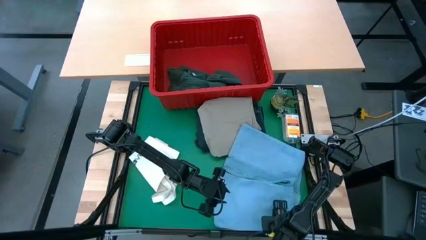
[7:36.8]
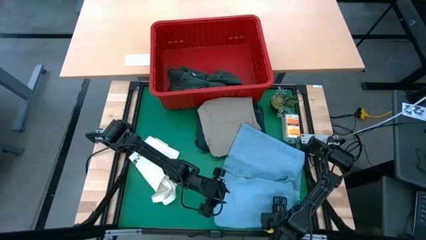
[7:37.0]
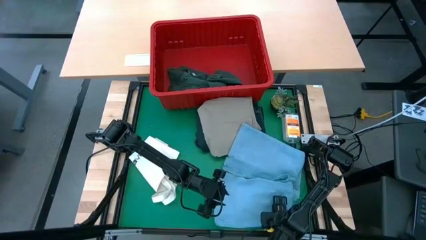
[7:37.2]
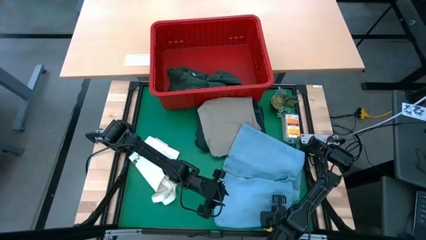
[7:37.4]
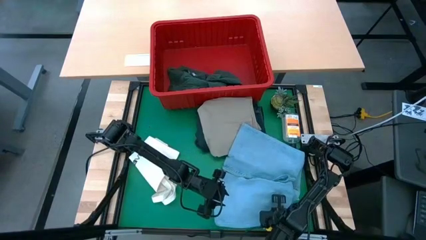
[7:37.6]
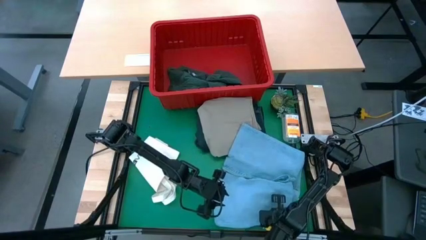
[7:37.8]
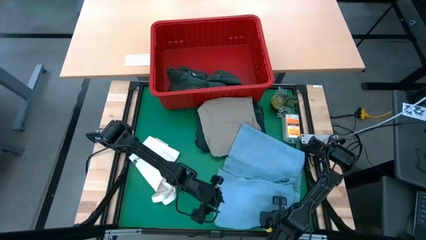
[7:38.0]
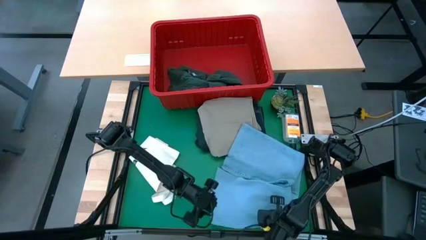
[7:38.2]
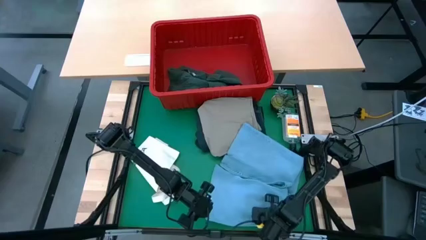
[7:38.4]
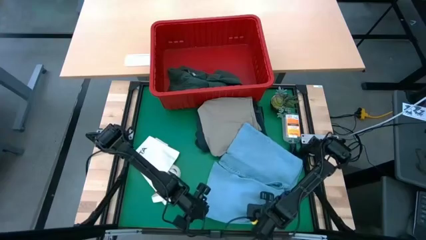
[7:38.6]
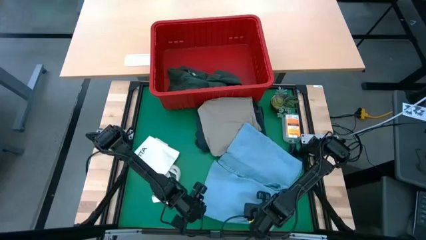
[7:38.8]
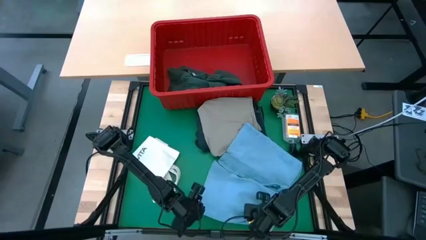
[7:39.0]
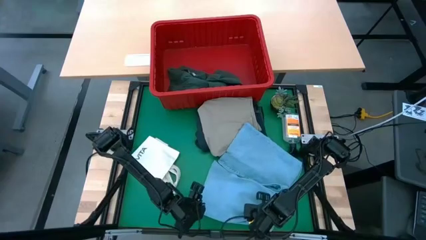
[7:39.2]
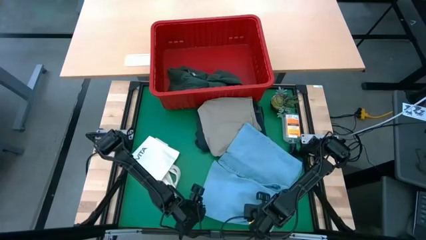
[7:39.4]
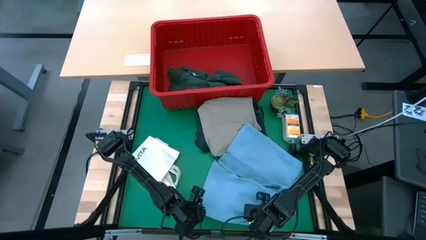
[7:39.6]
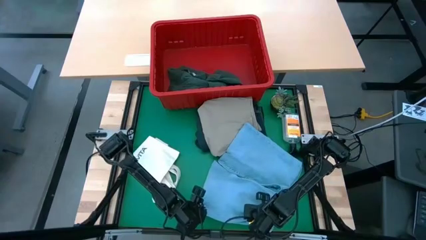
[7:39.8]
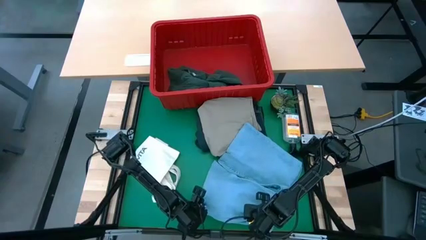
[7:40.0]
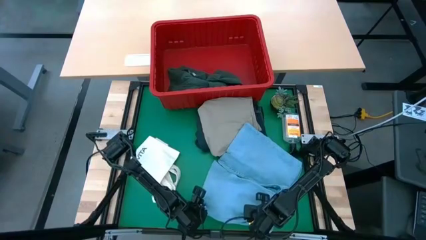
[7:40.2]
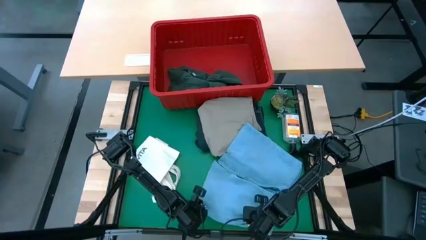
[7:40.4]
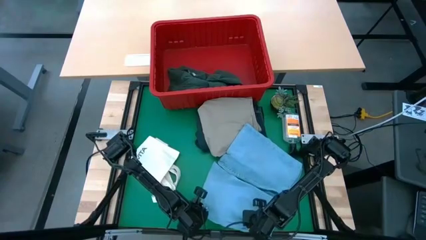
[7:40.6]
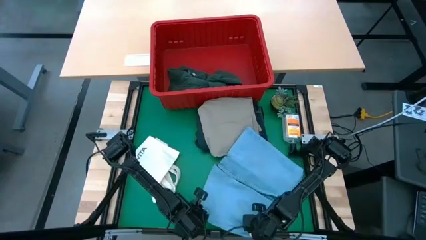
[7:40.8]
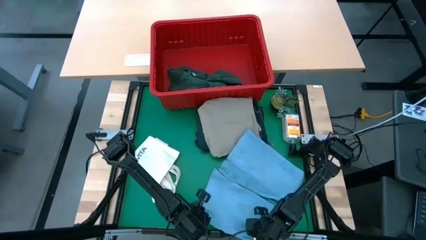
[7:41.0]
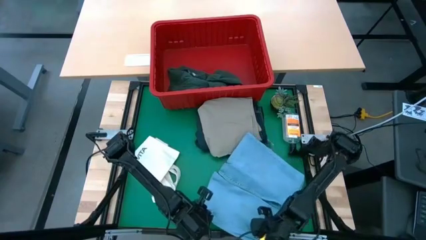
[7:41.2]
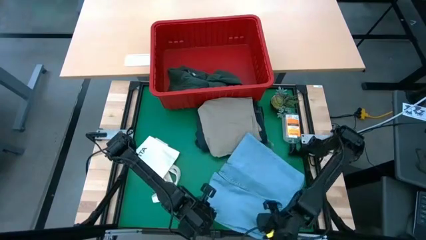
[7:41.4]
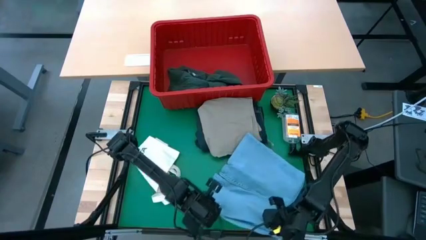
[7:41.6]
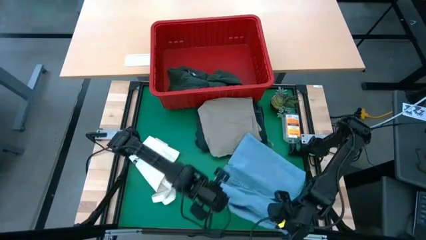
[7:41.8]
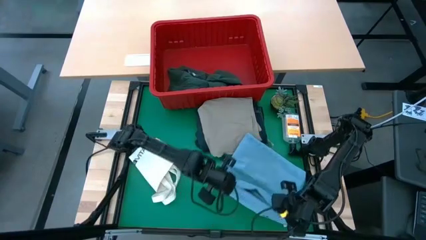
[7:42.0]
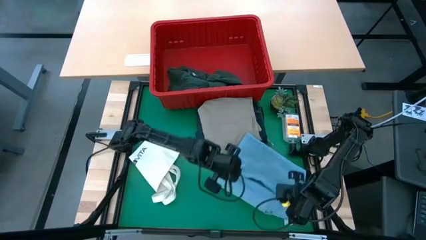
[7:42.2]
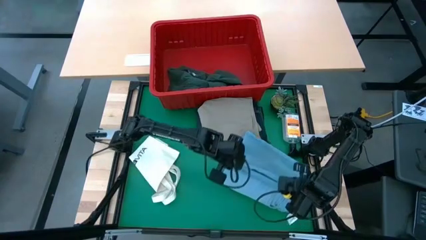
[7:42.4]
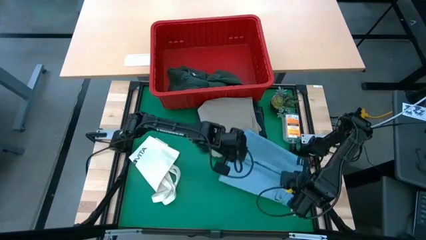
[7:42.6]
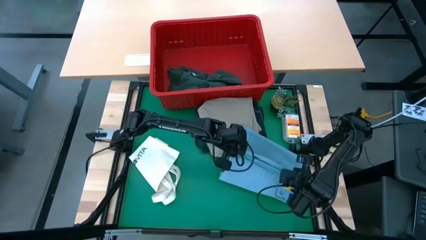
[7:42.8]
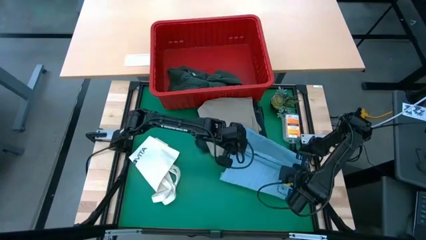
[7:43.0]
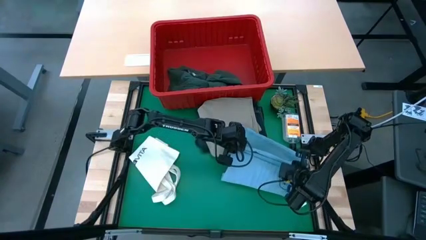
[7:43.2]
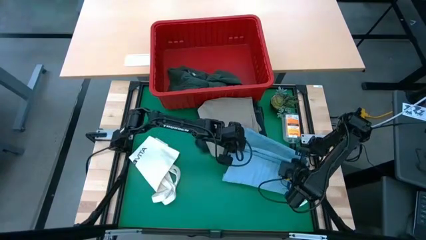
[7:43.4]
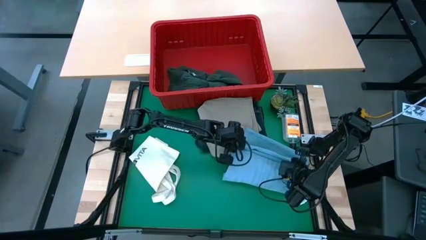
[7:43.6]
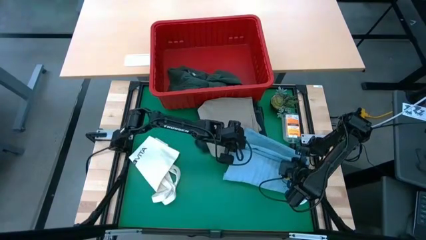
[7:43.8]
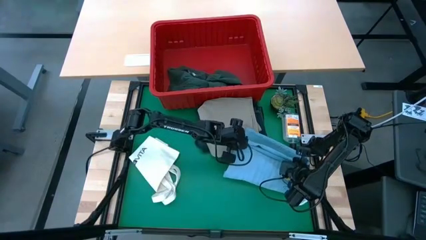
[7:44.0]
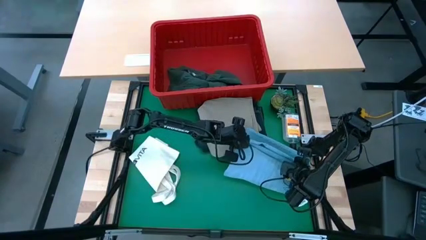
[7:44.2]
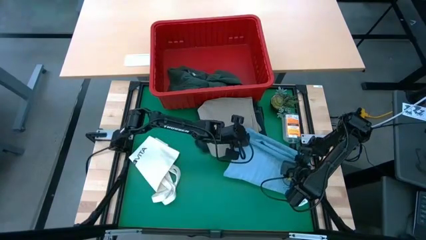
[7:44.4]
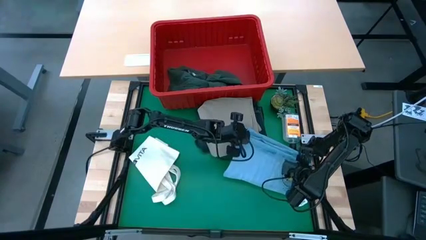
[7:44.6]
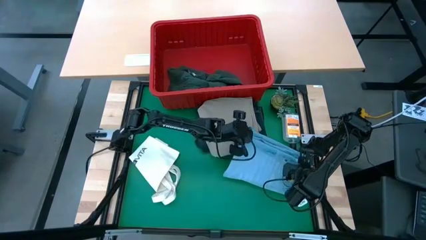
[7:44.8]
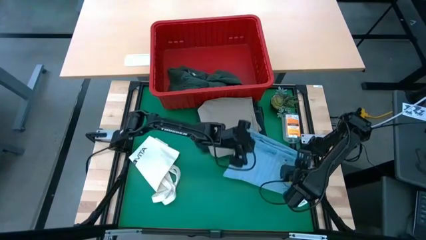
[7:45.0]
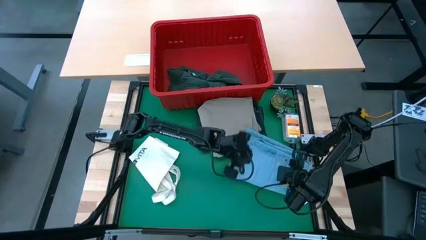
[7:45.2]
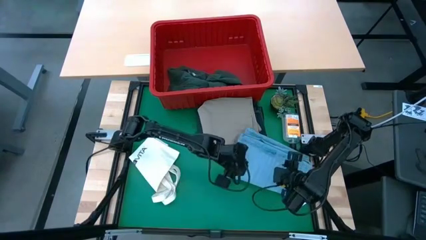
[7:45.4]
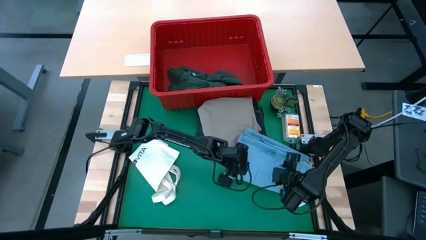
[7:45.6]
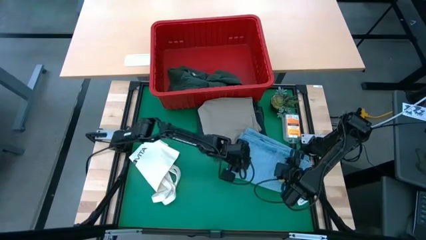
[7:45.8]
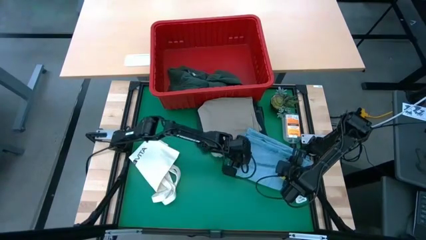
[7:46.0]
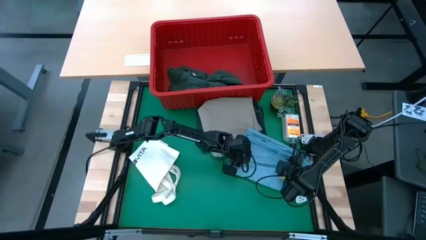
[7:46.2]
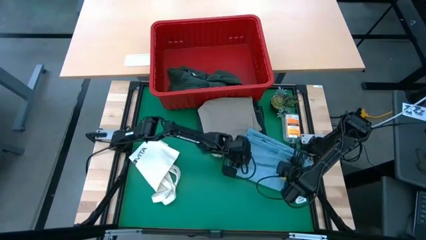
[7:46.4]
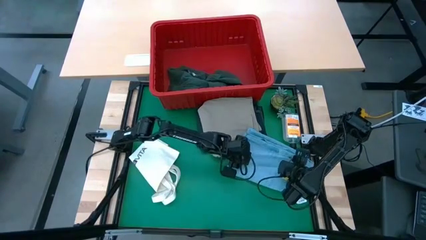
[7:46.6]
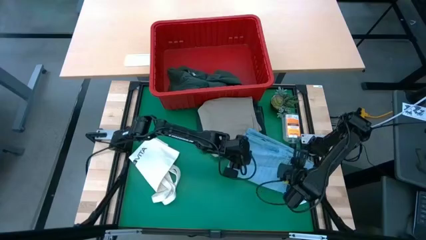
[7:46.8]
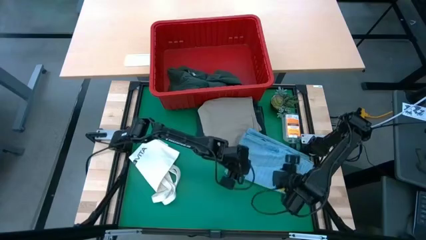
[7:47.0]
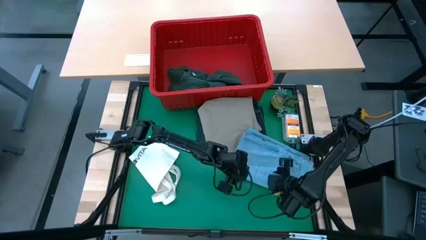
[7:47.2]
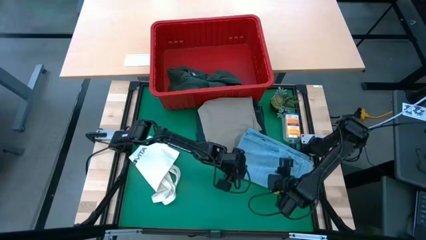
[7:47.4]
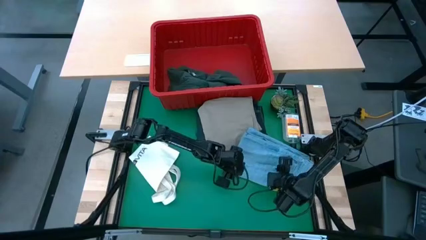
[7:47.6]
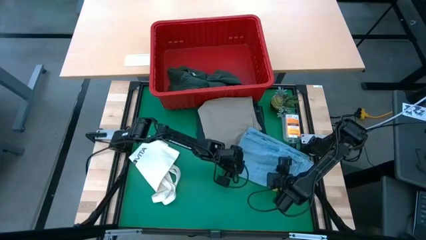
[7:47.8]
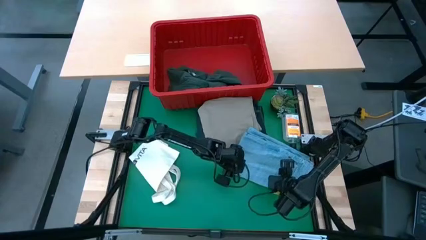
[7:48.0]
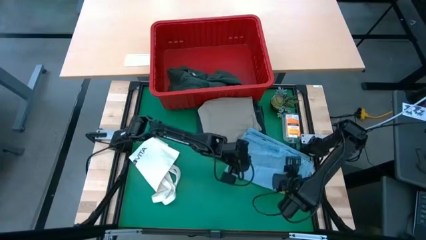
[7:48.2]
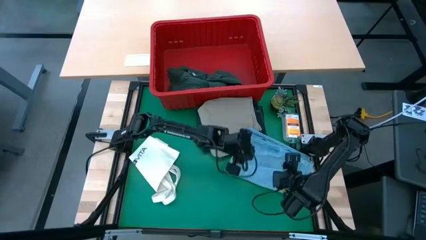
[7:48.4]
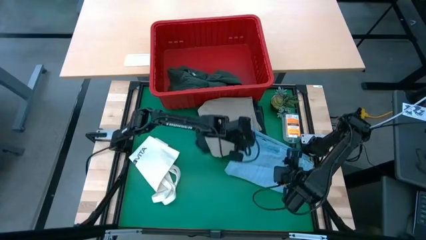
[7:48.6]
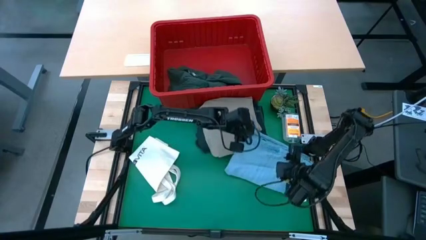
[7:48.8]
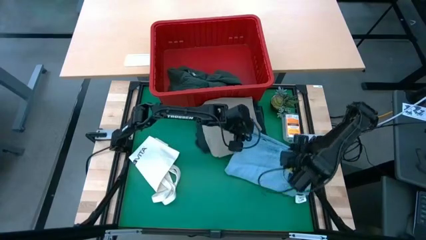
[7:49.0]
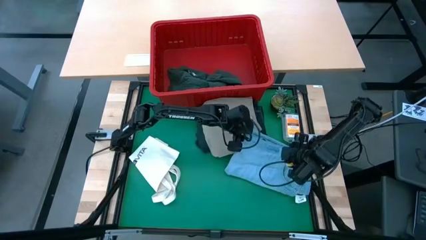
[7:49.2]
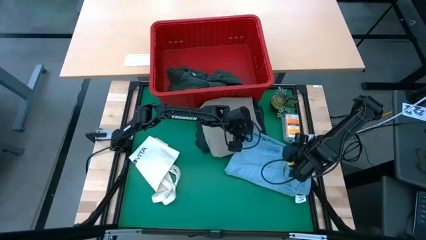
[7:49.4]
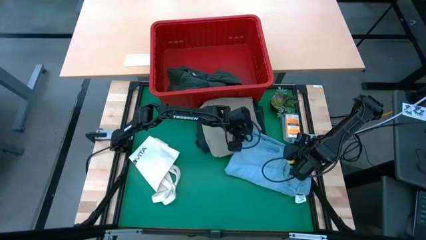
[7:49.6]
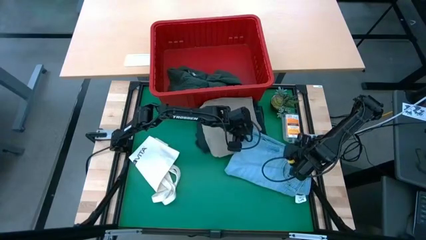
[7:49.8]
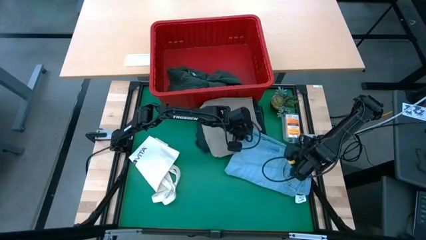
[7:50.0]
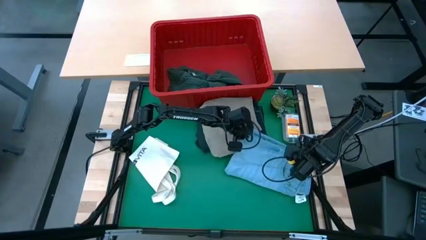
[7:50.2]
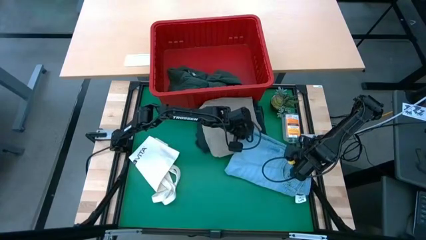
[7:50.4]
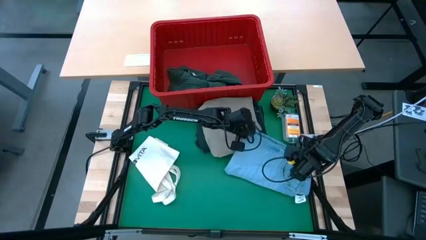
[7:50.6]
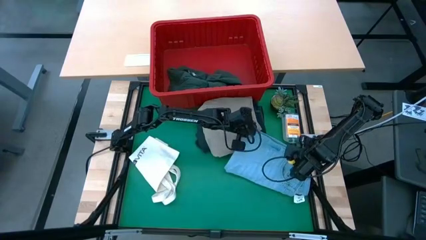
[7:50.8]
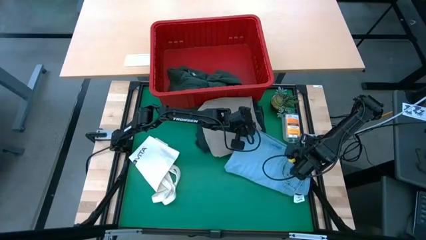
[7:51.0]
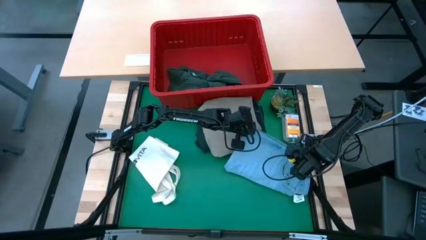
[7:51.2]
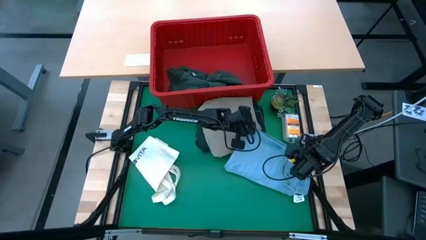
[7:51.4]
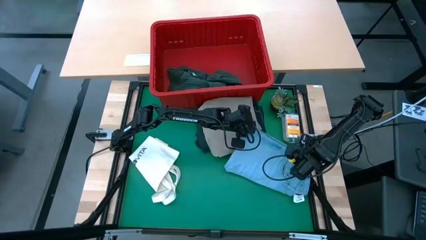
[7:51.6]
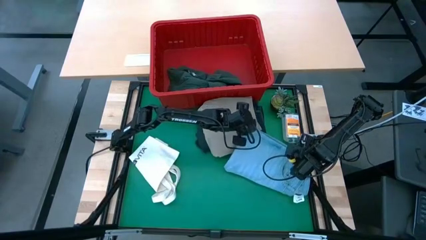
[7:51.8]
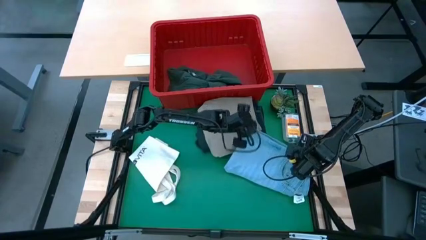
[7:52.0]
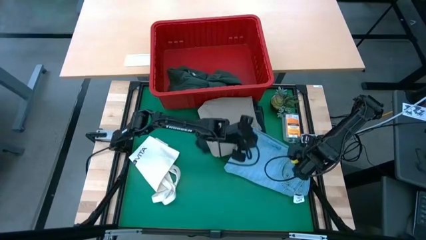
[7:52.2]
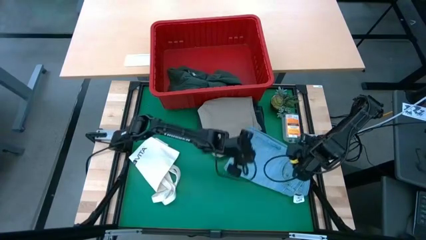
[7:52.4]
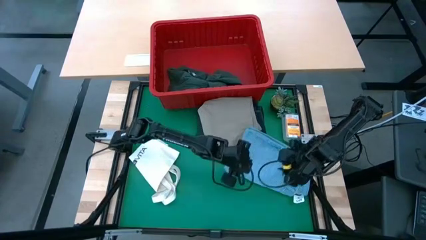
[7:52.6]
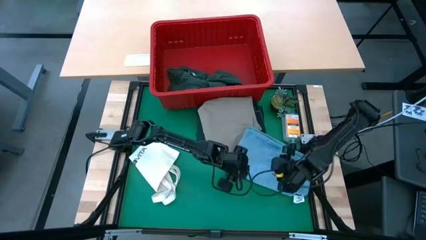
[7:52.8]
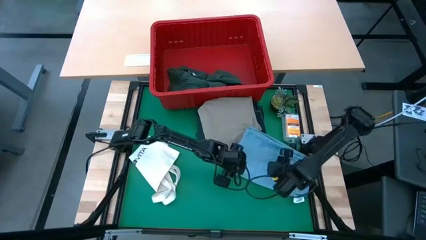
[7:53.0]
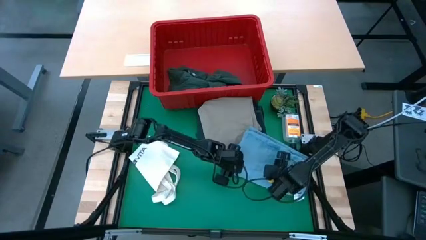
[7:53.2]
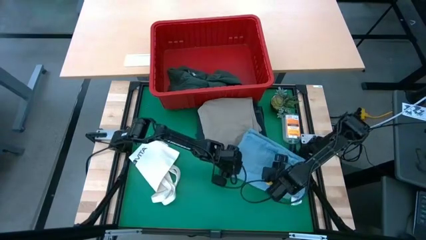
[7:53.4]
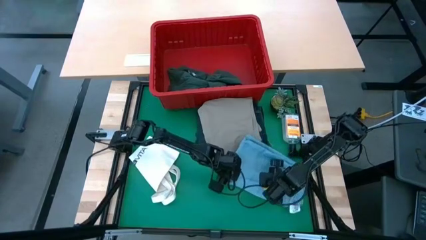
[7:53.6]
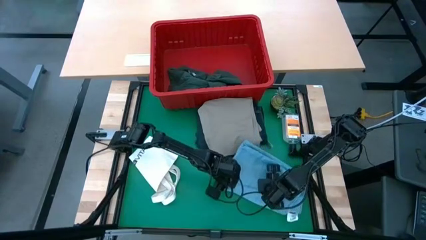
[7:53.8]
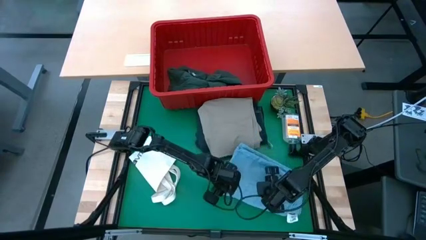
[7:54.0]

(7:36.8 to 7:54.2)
Task: Fold laundry
Fold the blue pants
